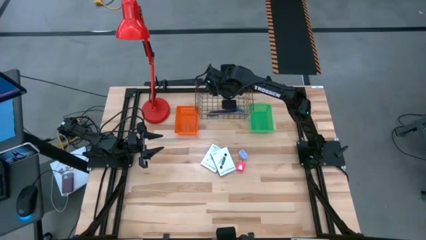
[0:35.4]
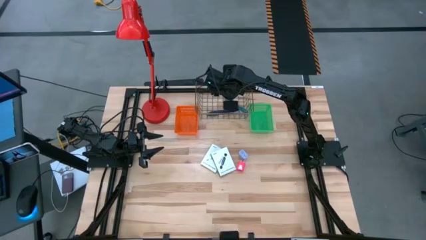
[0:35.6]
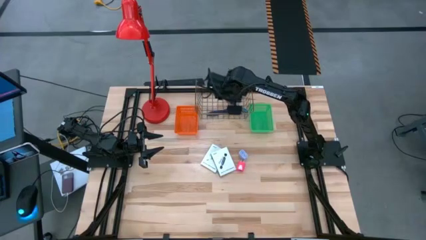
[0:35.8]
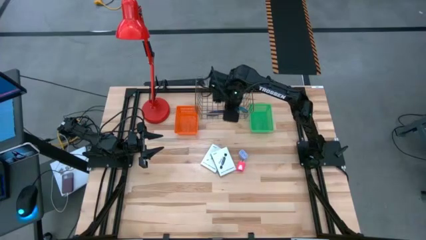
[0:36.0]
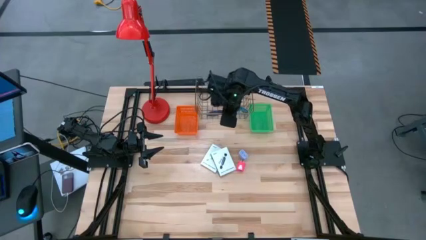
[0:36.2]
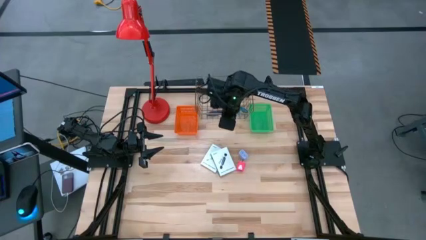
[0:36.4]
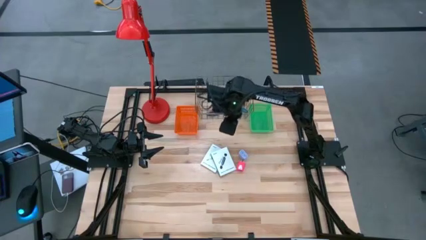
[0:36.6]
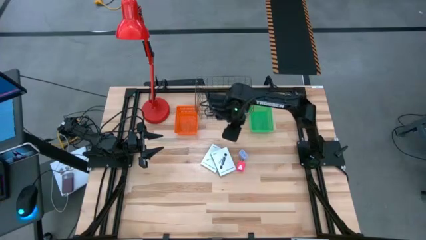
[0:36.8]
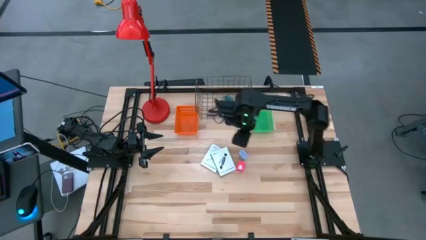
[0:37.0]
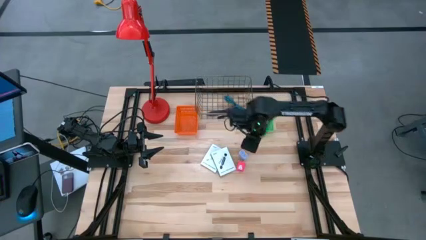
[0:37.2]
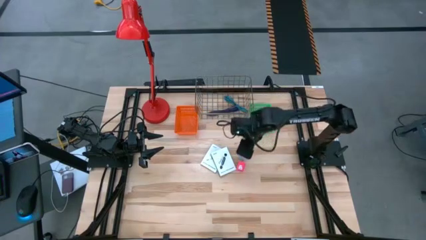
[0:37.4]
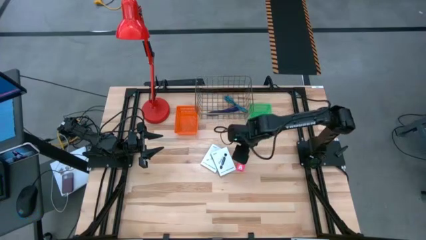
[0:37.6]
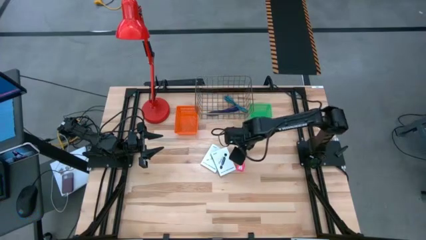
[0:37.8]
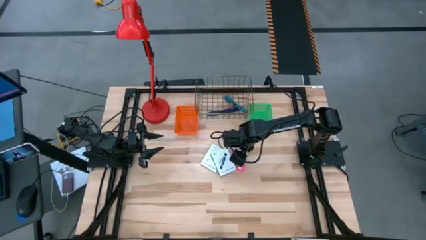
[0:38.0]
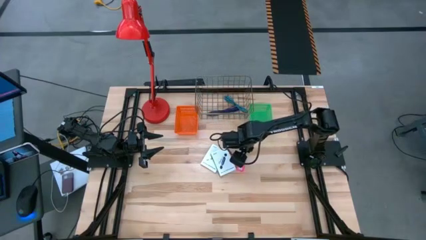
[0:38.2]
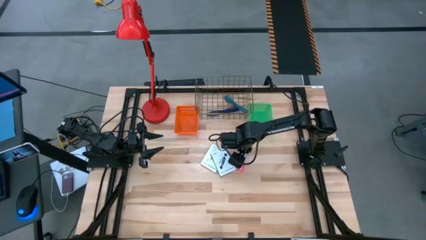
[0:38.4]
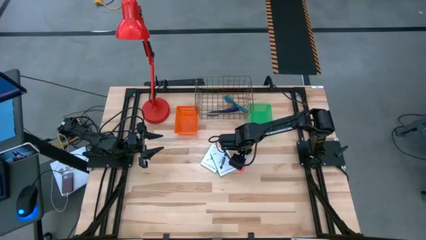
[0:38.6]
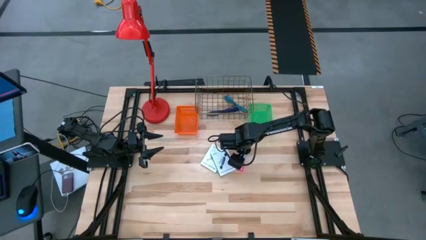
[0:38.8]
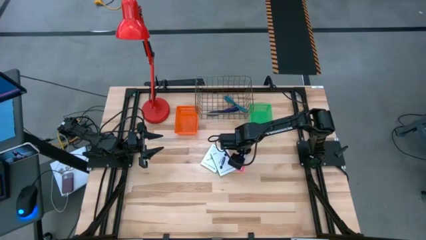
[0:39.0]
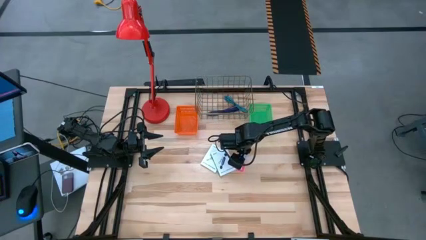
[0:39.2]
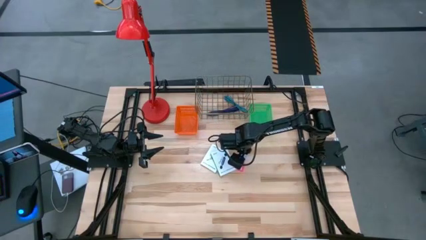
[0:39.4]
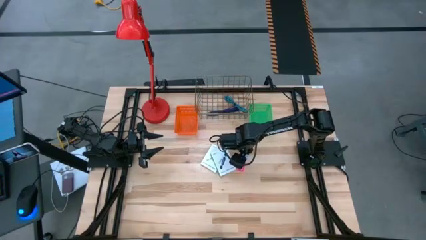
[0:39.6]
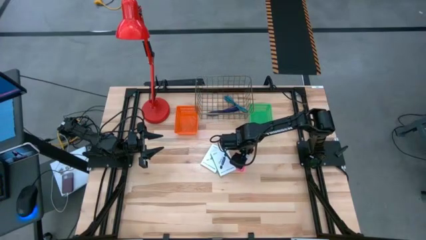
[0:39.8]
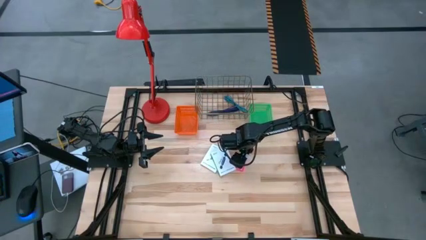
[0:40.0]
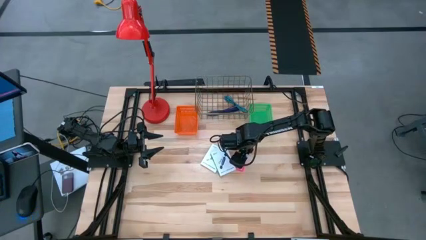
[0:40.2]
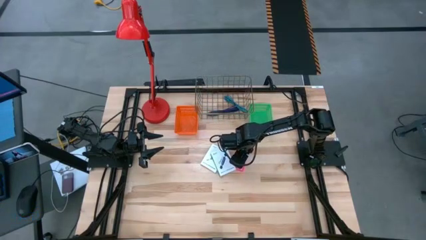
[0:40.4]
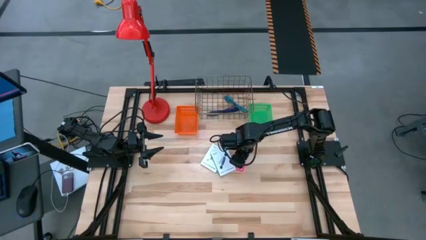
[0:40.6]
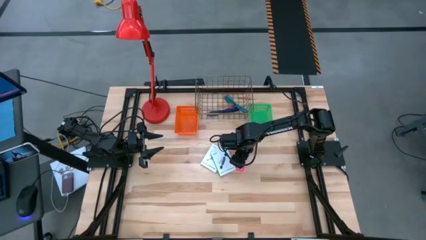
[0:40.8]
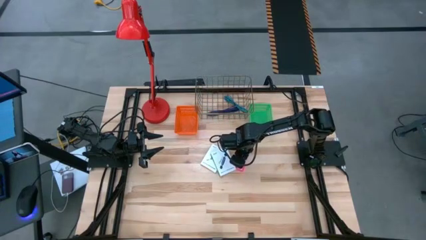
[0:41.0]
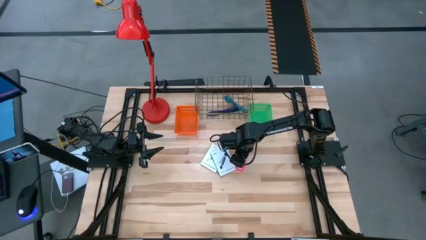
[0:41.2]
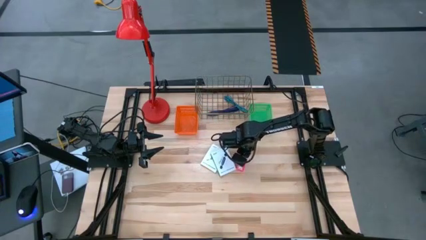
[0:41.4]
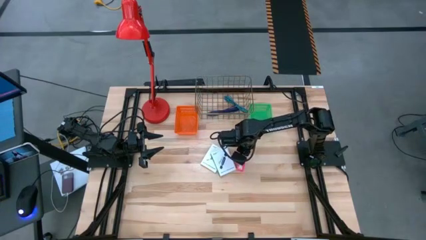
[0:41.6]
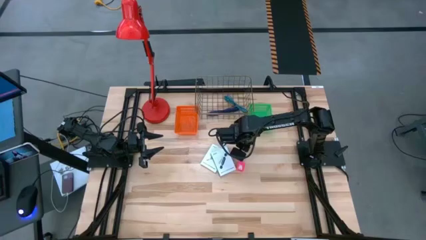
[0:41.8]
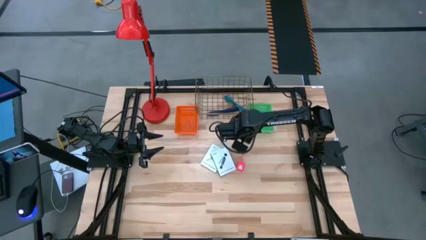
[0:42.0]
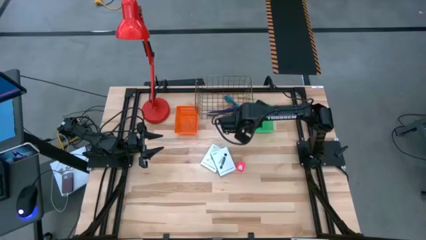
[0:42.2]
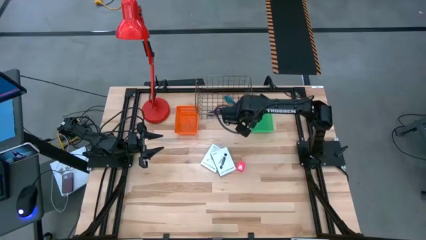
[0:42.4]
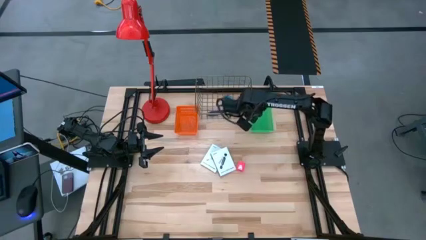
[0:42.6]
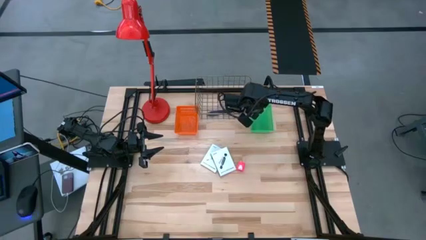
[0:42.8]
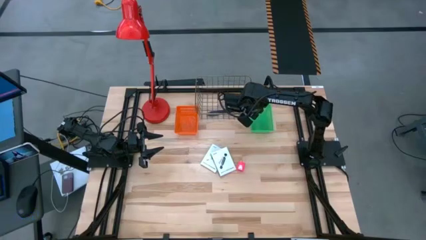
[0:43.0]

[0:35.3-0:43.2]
Task: Pick and place items into bin
Put the white charger adapter into the green bin

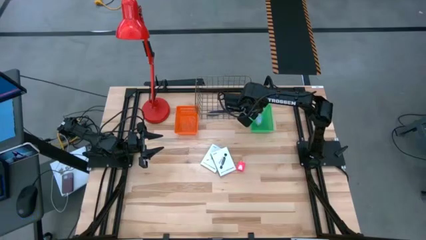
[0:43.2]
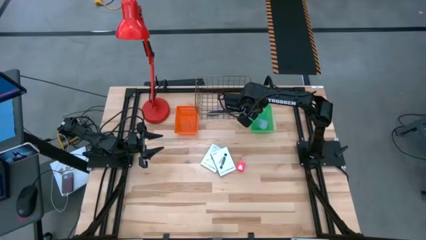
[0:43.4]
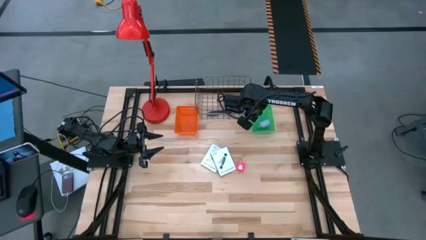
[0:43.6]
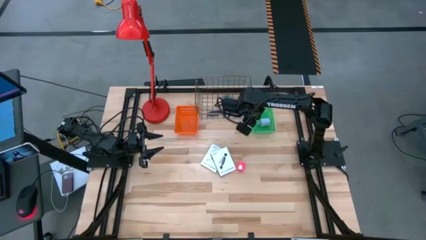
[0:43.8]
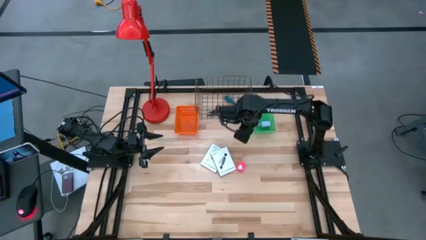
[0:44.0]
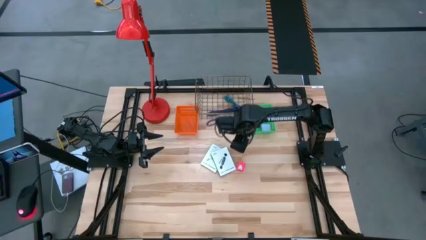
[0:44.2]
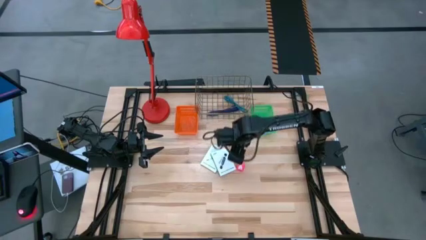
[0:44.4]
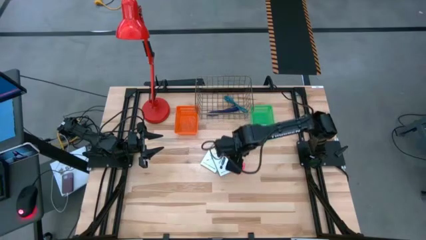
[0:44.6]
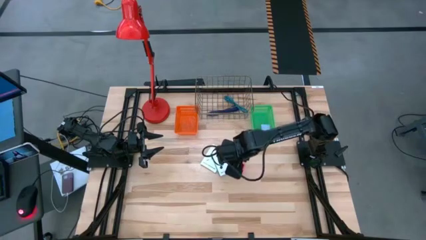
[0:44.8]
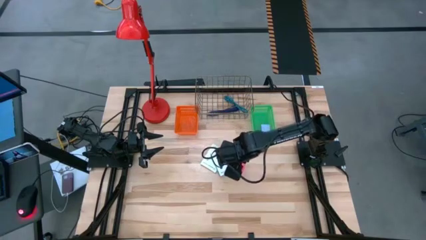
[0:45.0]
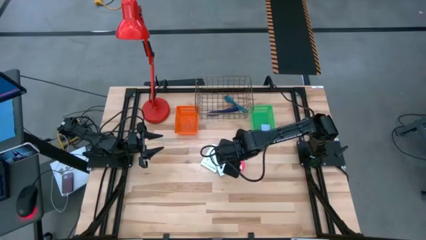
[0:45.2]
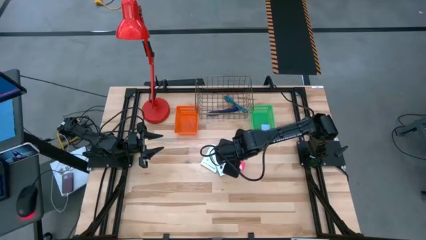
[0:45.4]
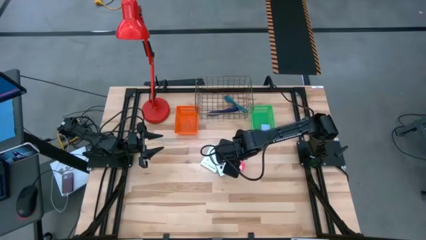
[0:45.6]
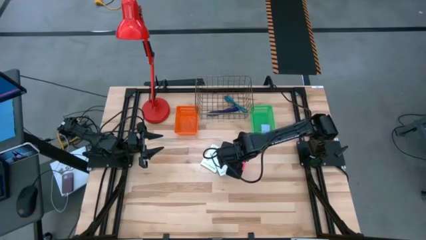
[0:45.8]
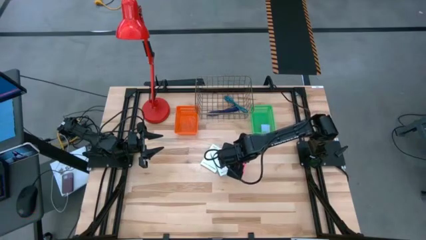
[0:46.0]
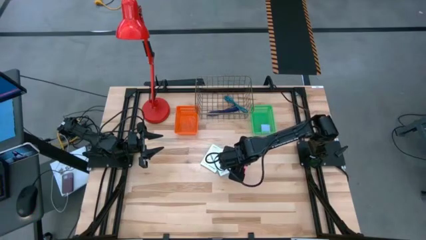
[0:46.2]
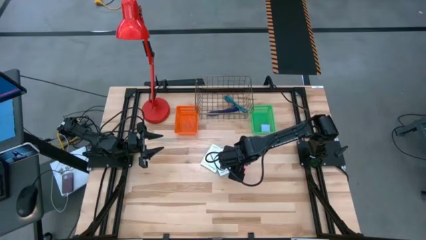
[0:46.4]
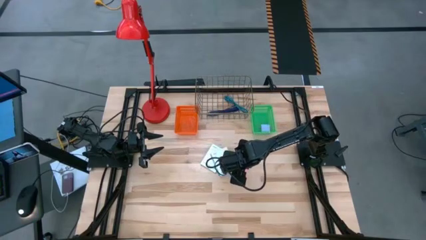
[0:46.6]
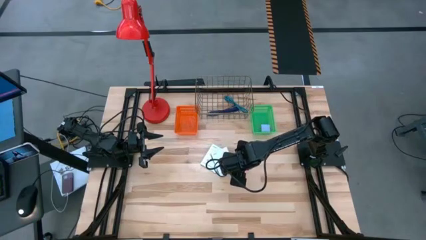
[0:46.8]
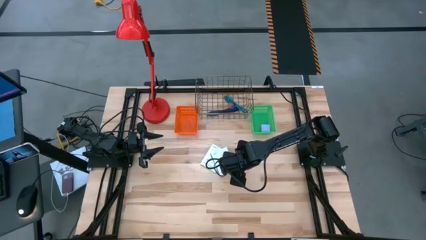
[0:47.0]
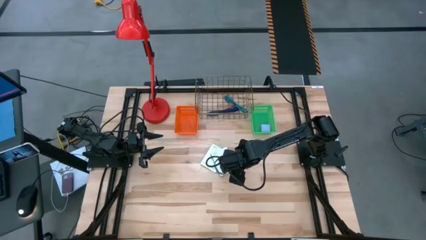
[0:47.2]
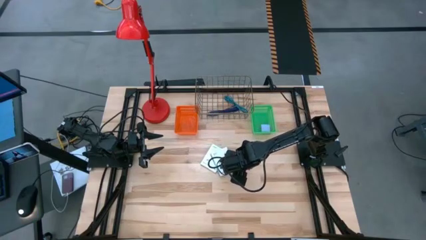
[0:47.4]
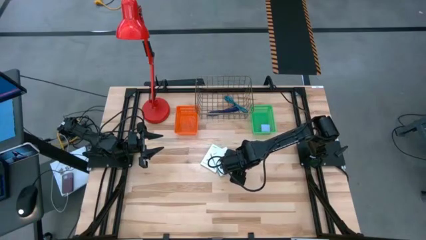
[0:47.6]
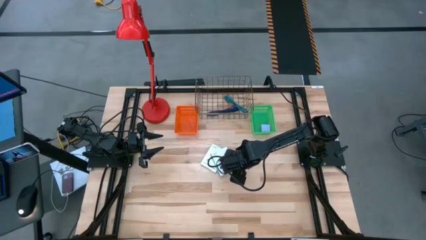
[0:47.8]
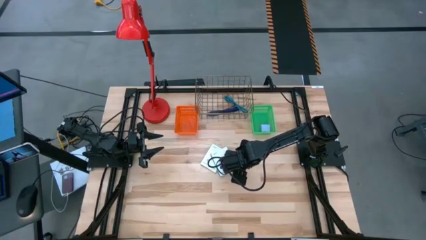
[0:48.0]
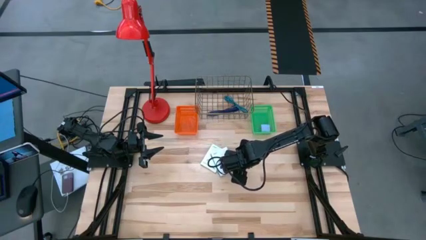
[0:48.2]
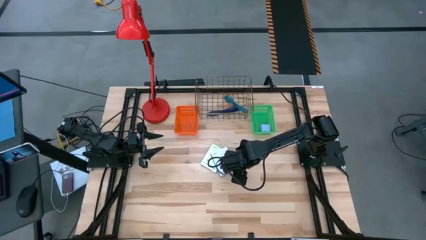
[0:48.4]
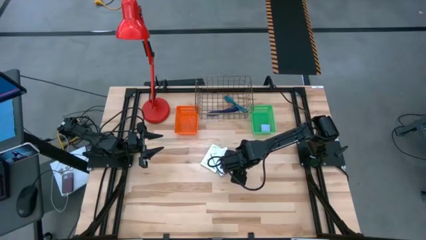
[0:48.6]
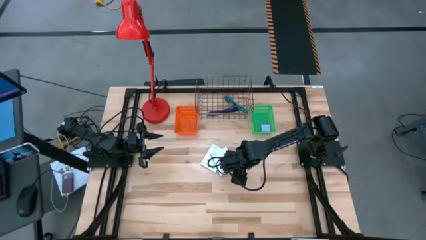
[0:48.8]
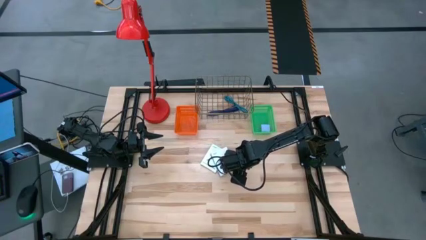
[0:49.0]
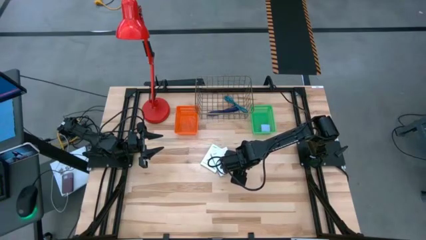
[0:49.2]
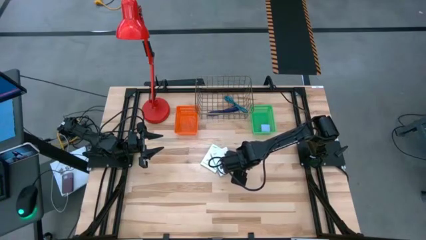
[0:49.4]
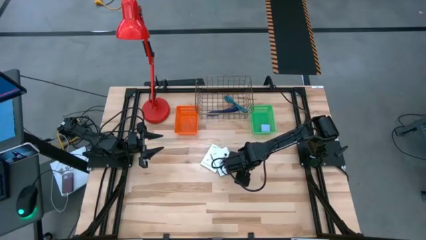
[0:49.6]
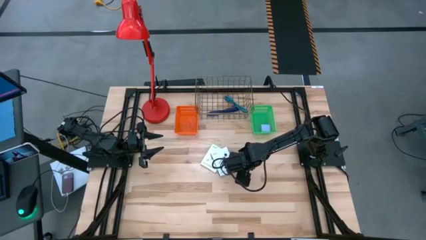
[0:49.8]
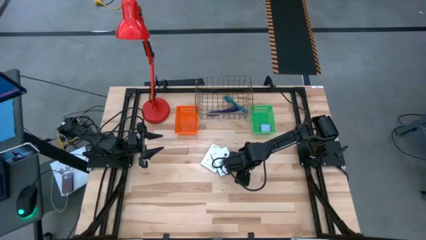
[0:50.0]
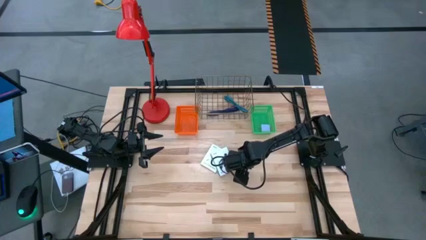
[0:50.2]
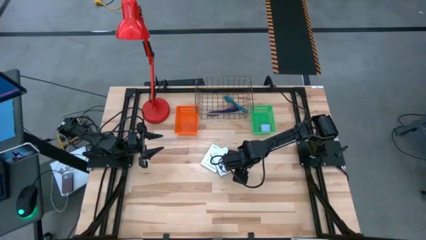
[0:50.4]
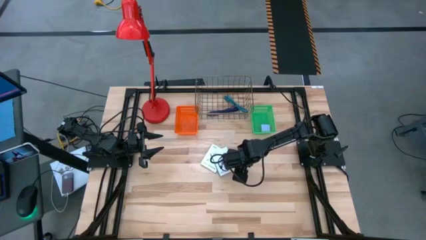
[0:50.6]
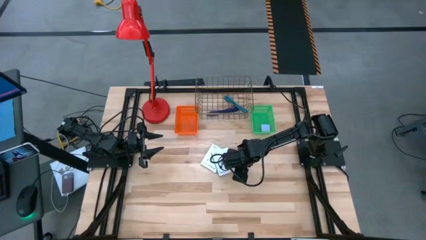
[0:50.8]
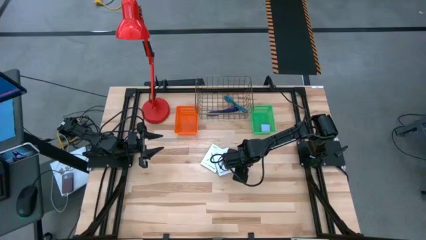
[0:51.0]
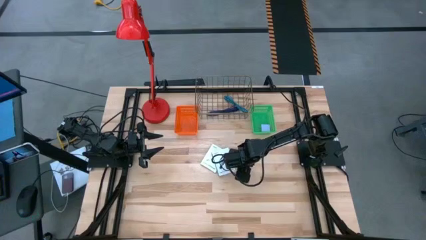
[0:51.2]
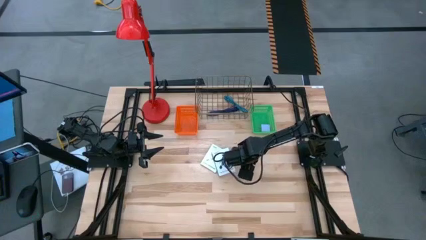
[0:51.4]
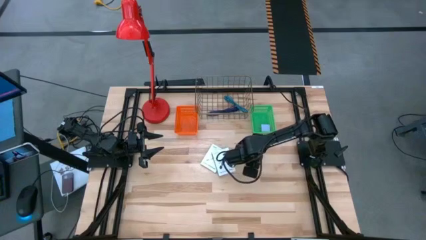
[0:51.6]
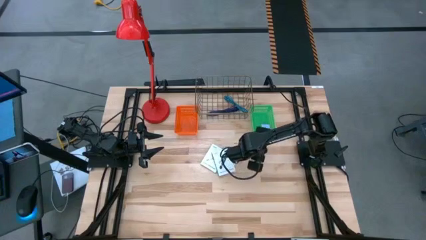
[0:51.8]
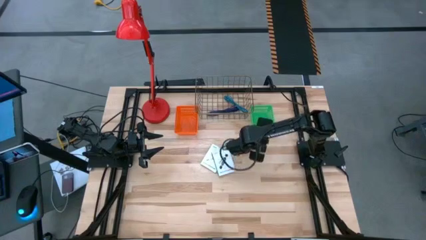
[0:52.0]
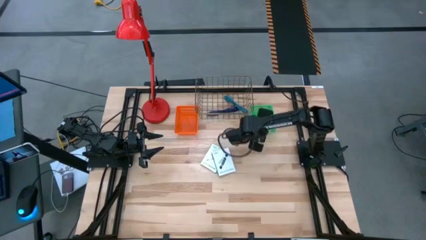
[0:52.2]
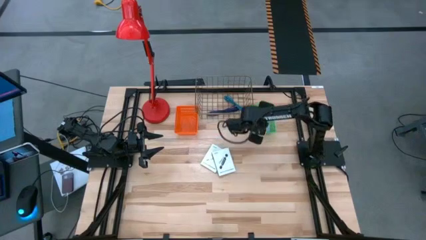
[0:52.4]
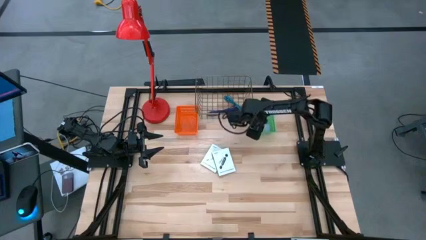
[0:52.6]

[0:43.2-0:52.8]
Put the pink charger adapter into the green bin
